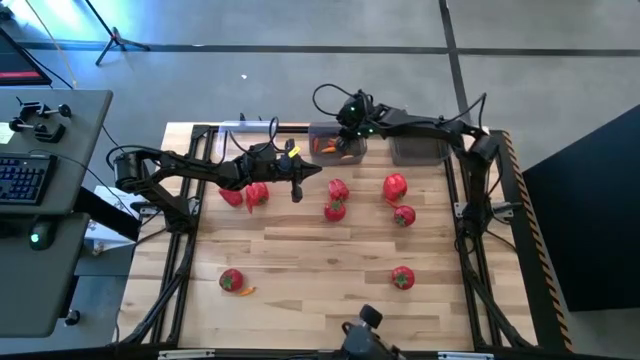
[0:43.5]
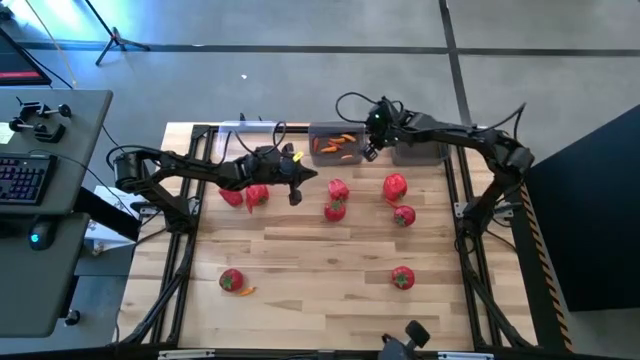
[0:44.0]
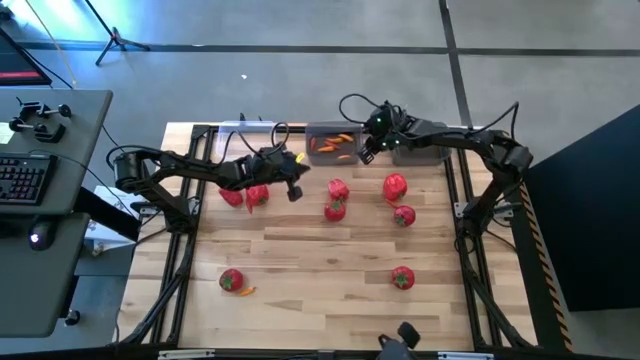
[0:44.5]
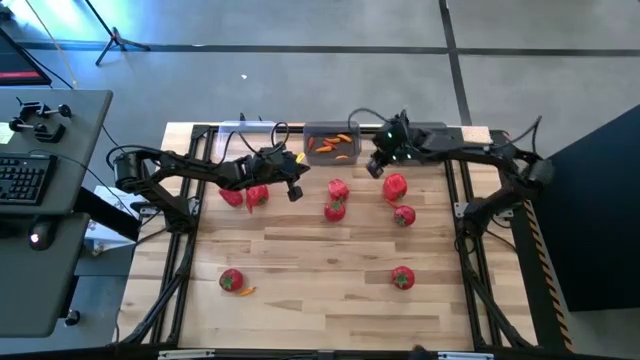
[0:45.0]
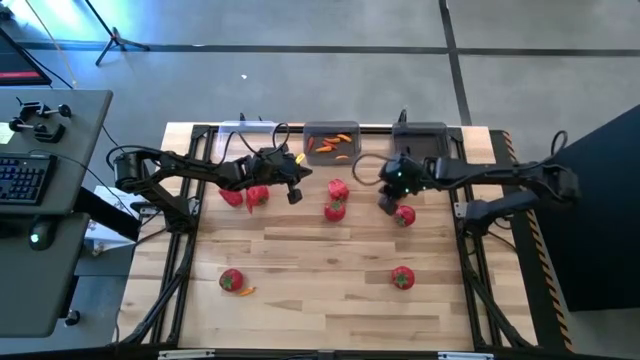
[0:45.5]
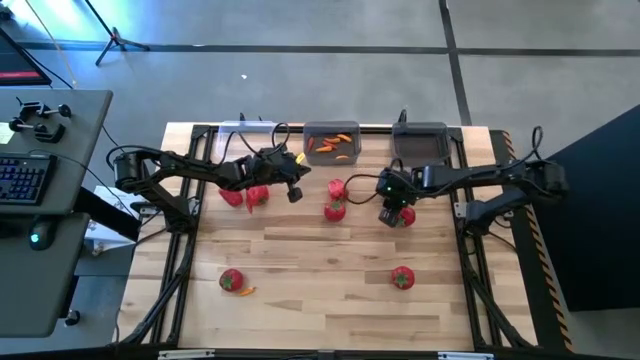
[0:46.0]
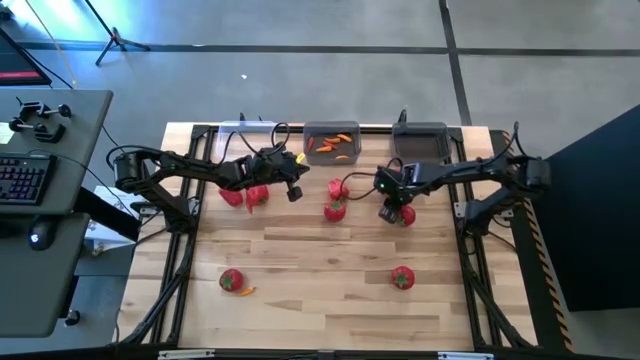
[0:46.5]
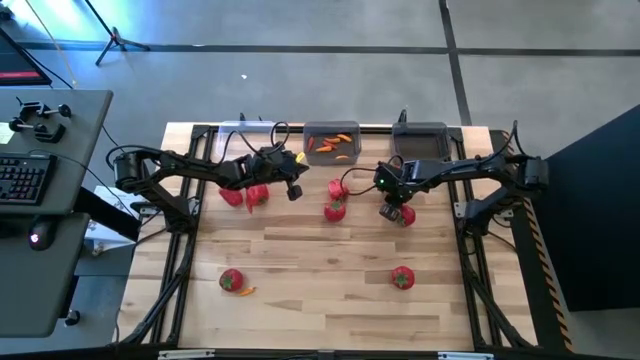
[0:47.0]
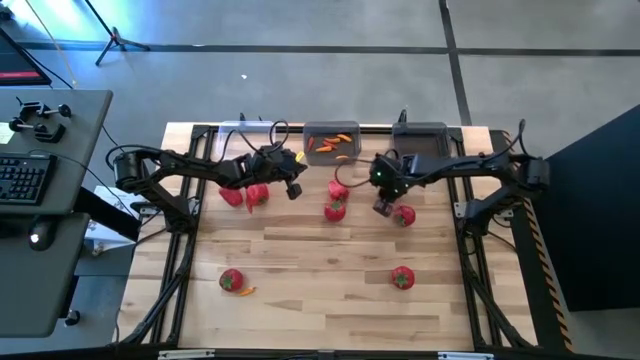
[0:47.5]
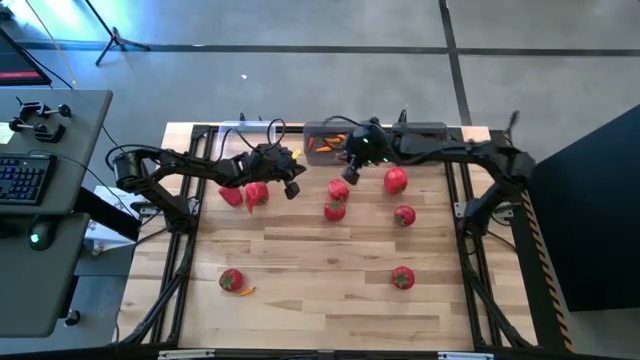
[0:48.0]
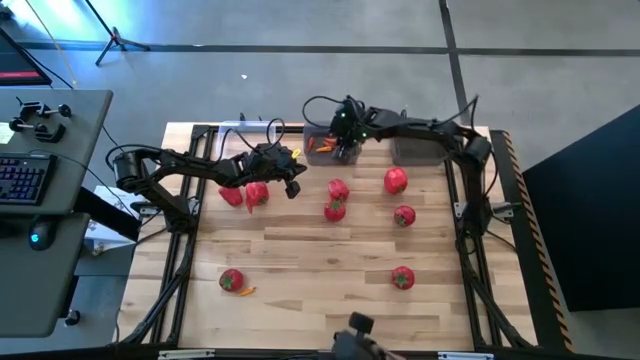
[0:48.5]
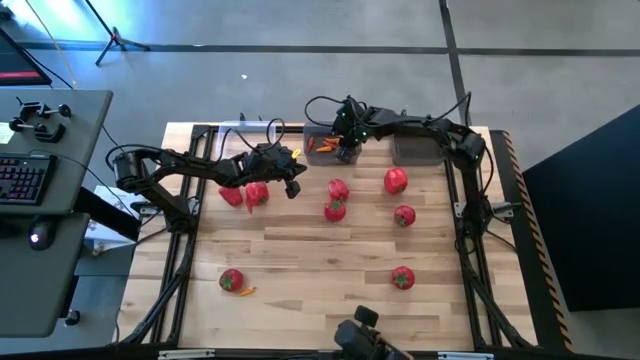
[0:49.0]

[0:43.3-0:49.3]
Task: Sort produce into baskets
Put the orange chili pepper into the left black bin

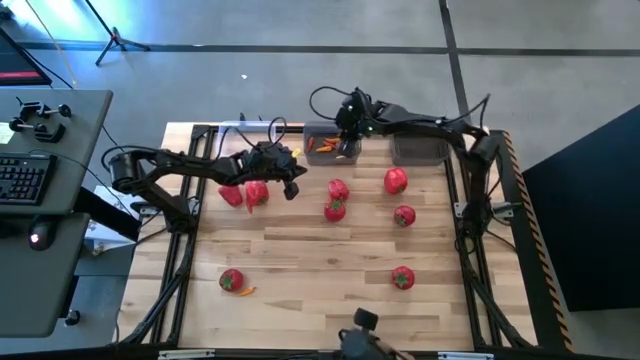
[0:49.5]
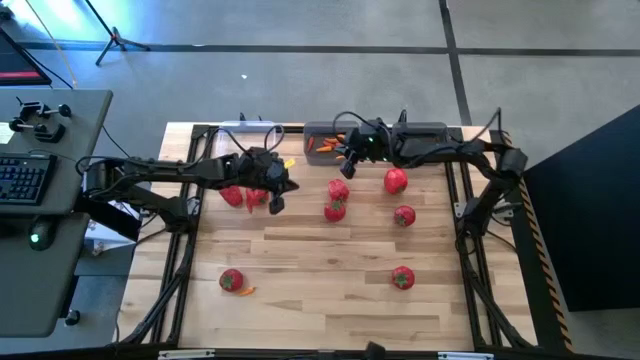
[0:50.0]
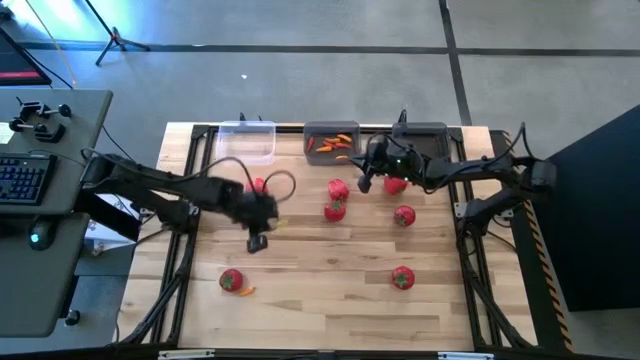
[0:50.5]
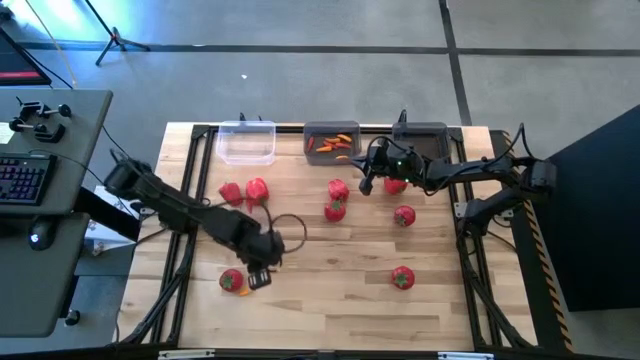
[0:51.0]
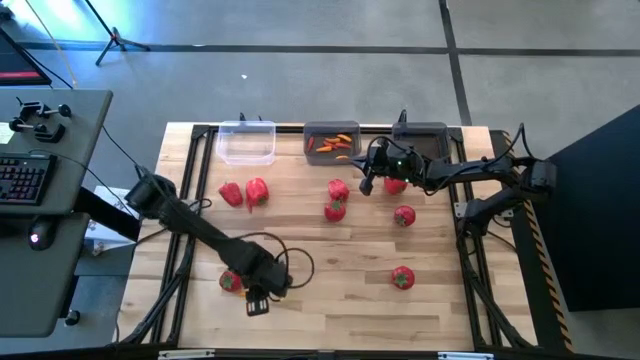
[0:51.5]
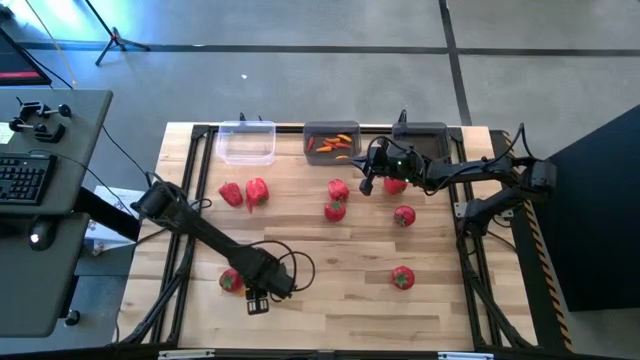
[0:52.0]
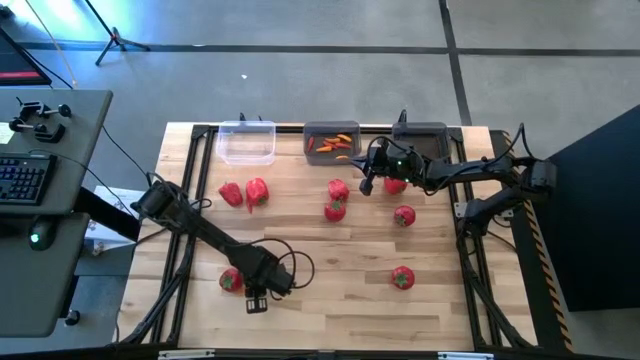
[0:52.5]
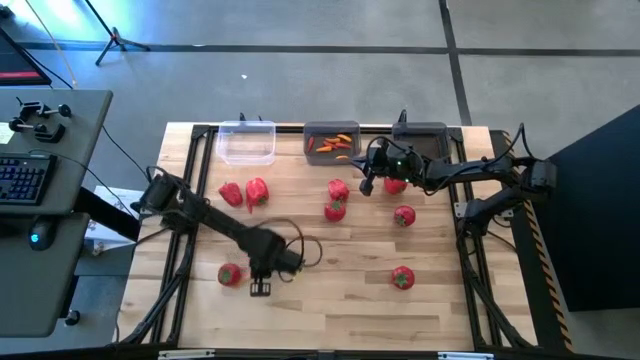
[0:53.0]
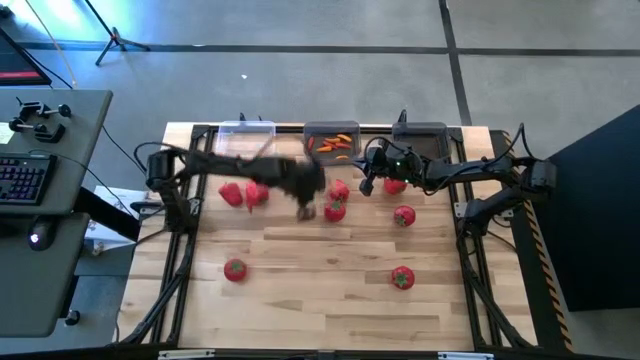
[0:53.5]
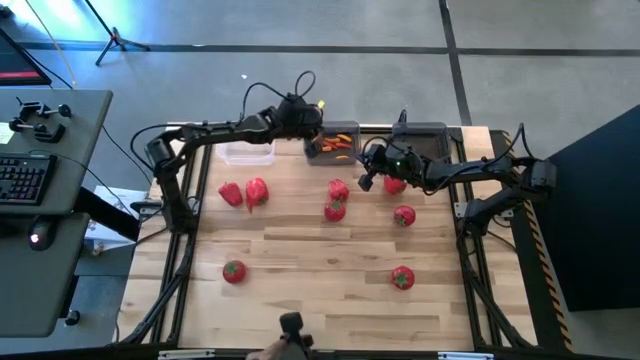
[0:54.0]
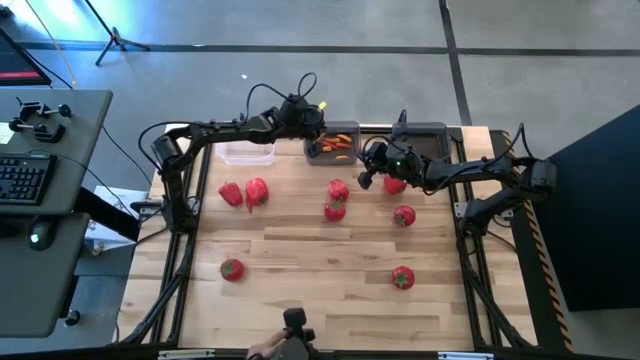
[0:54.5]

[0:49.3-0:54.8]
Put the yellow chili pepper into the left black bin

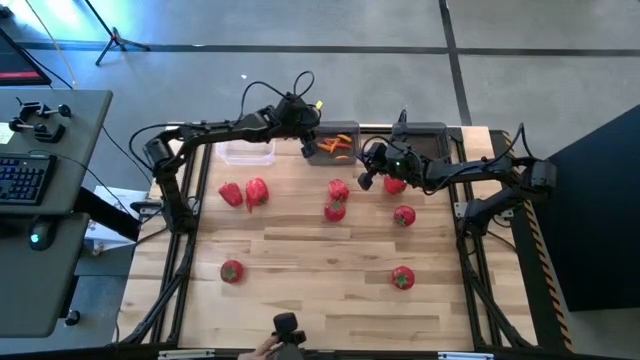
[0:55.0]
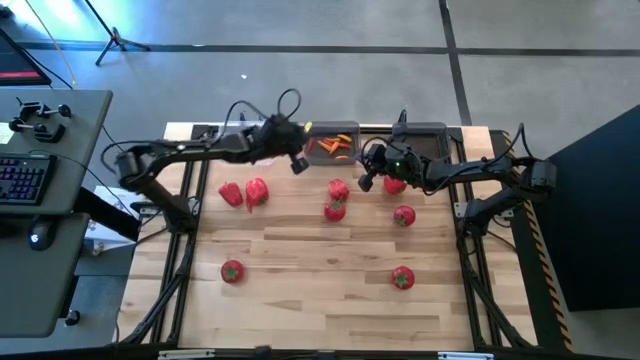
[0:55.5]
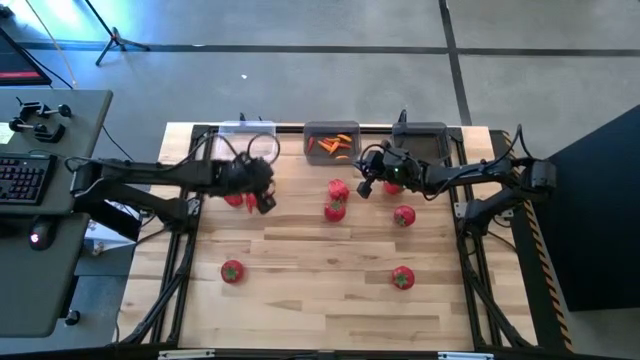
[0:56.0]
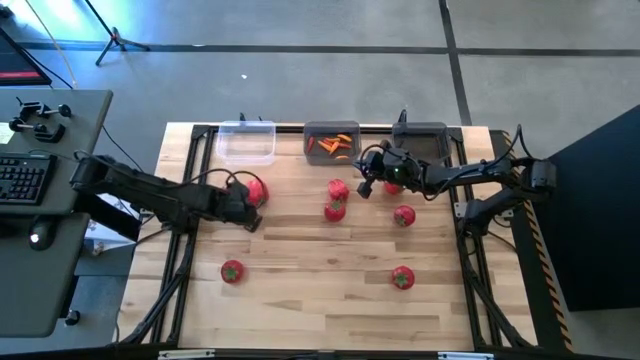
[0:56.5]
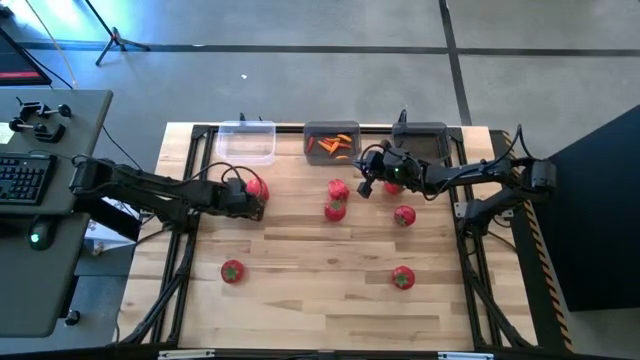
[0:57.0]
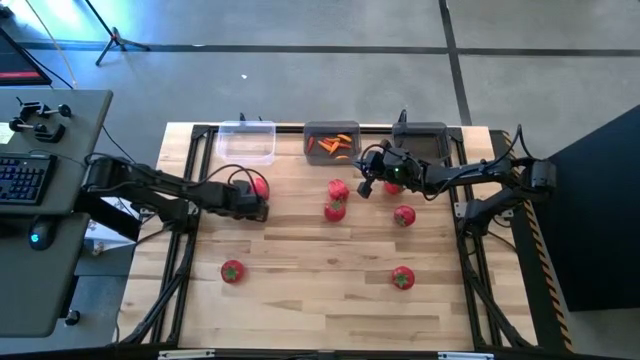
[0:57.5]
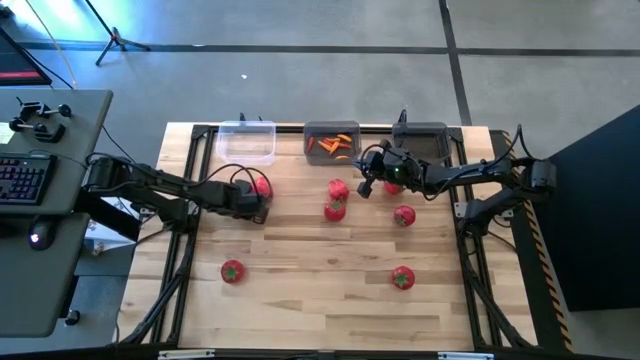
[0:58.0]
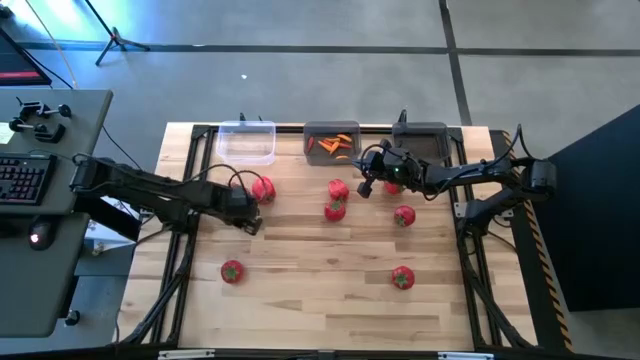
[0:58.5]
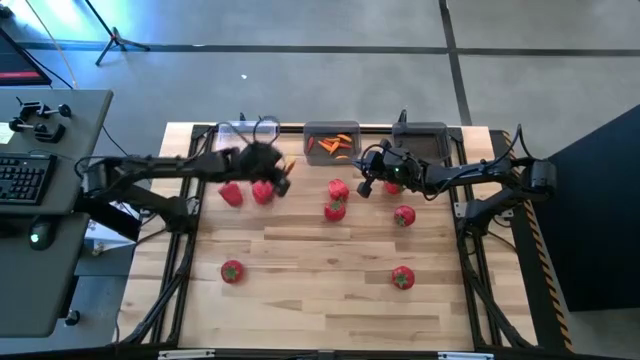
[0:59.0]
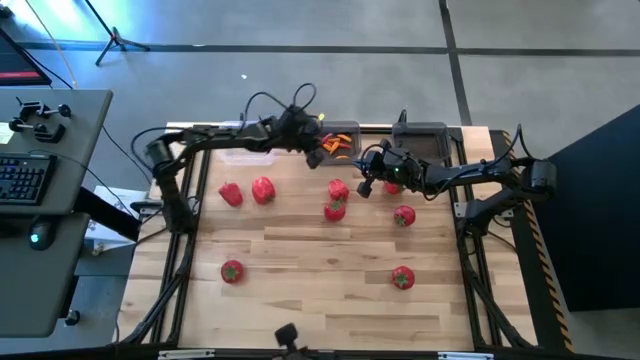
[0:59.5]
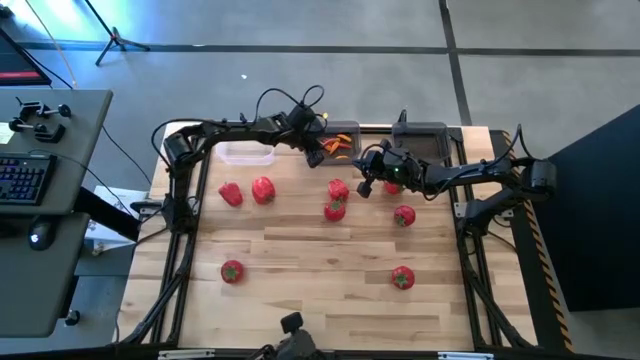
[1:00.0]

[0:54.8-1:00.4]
Put the orange chili pepper into the left black bin

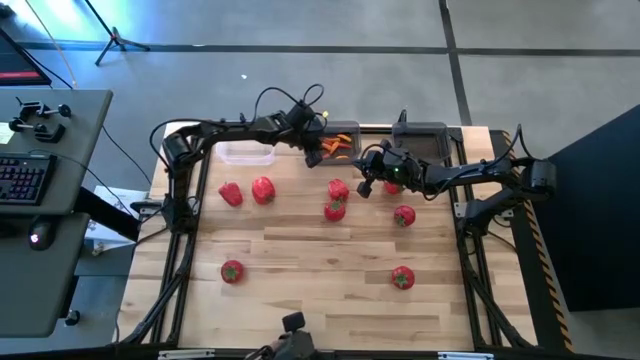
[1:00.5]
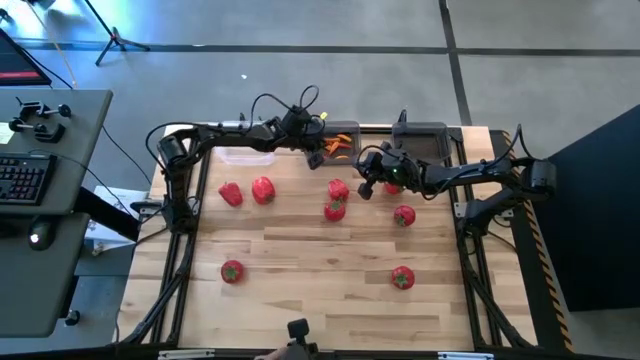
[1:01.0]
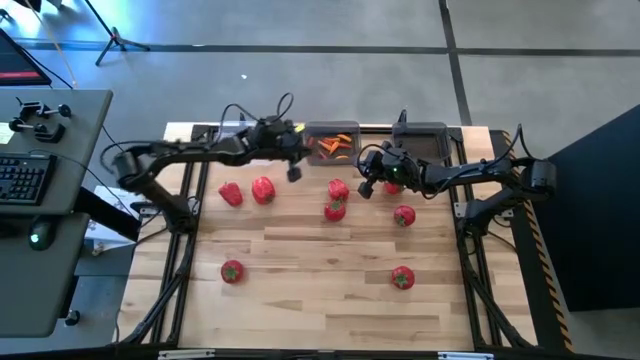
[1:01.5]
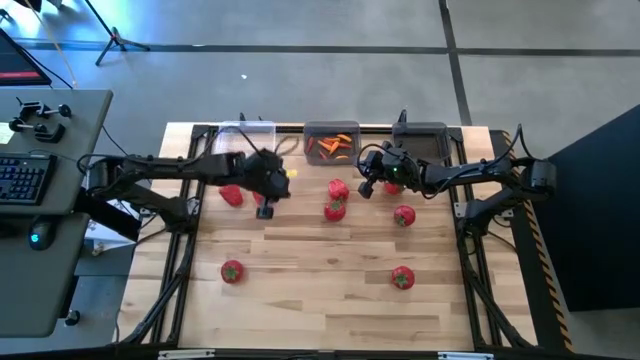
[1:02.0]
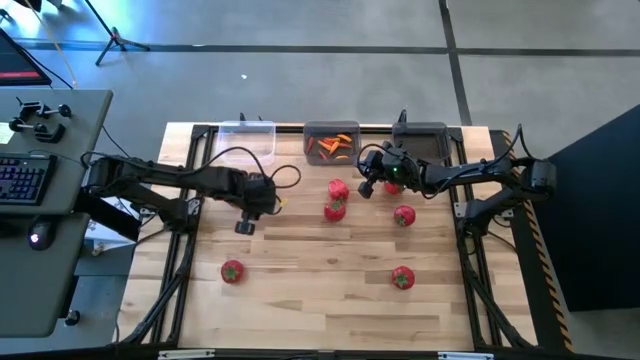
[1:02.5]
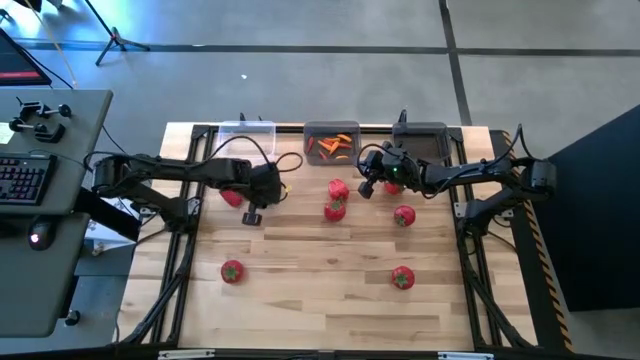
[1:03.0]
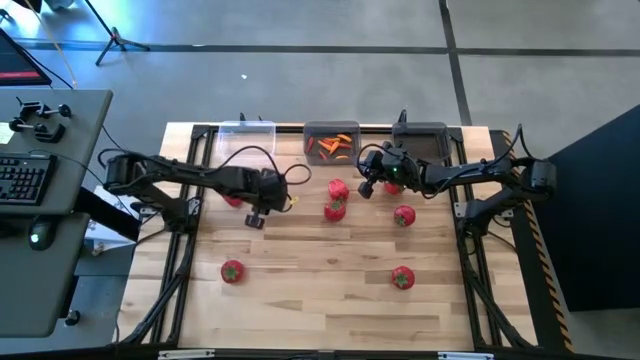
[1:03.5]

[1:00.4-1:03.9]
Put the bell pepper into the transparent bin

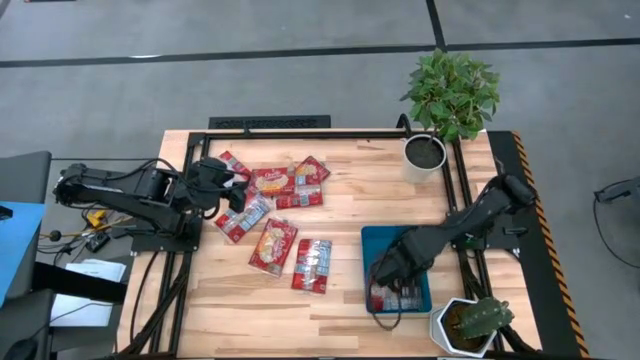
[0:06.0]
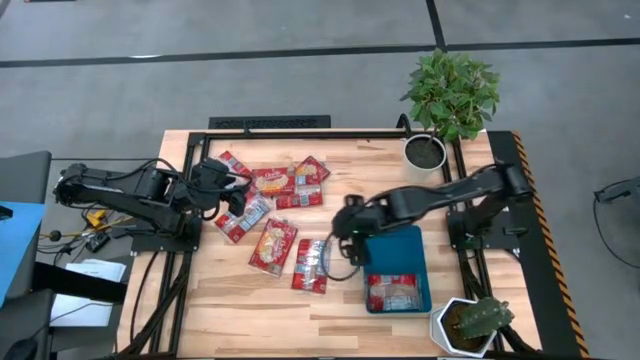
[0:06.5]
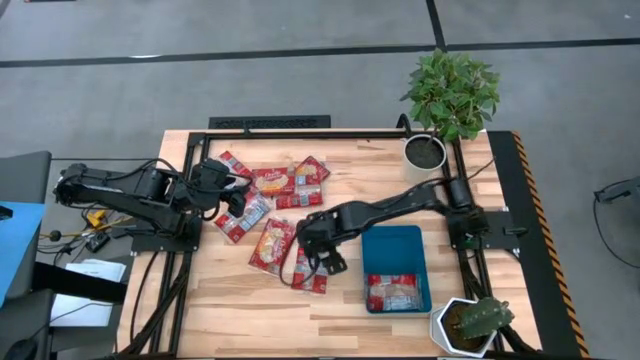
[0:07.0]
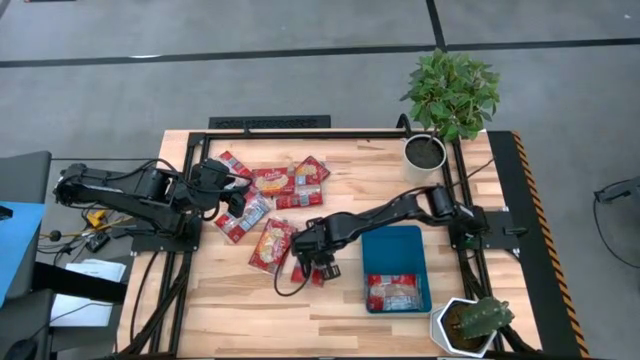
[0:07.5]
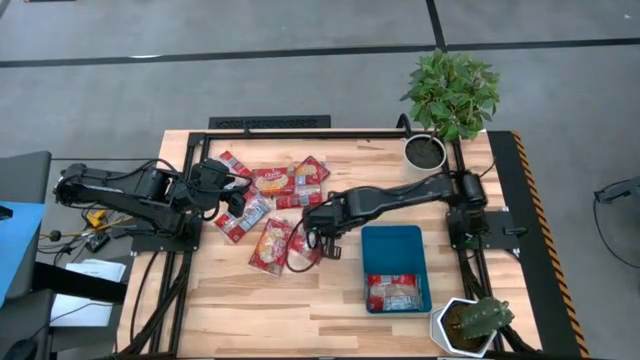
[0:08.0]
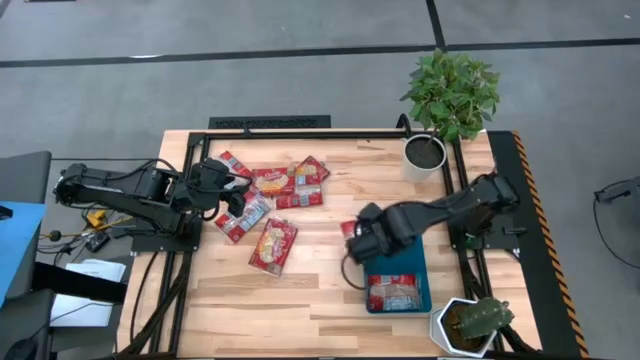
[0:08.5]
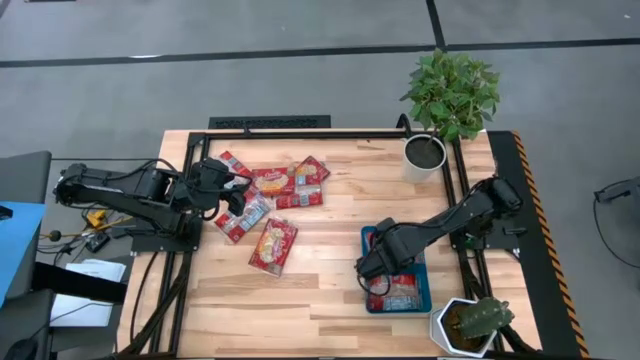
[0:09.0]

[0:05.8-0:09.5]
Task: Sort popcorn bags into baskets
Put the red popcorn bag into the blue bin
